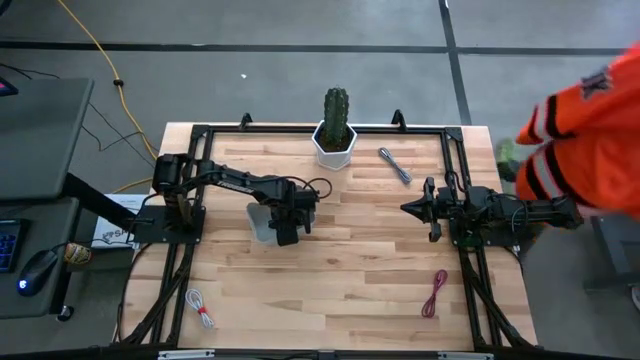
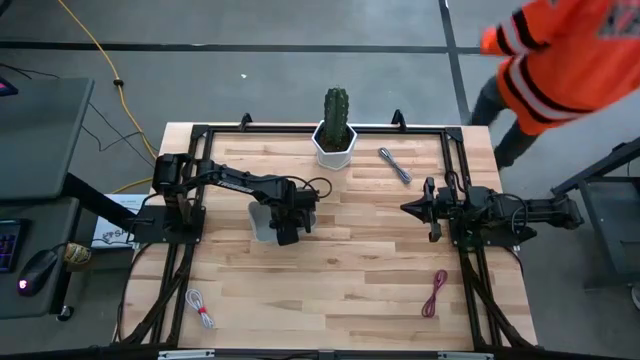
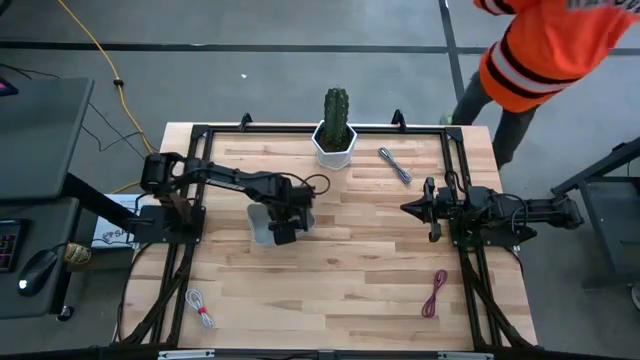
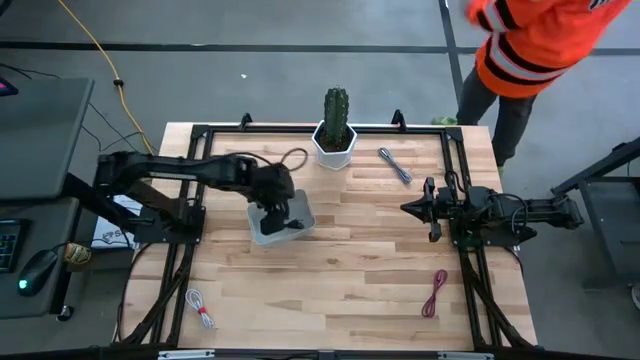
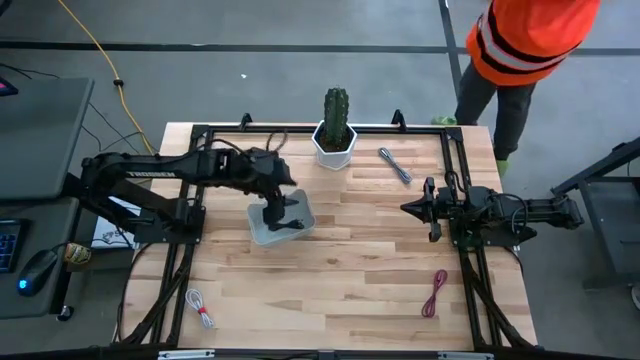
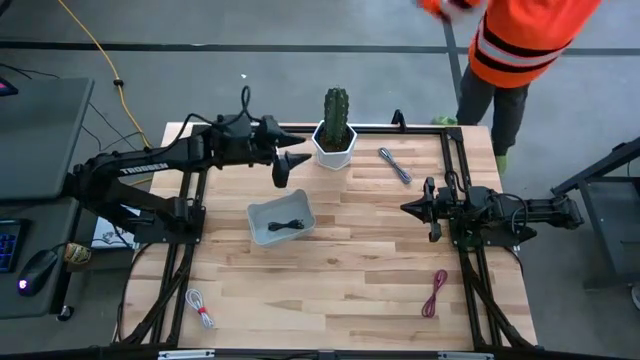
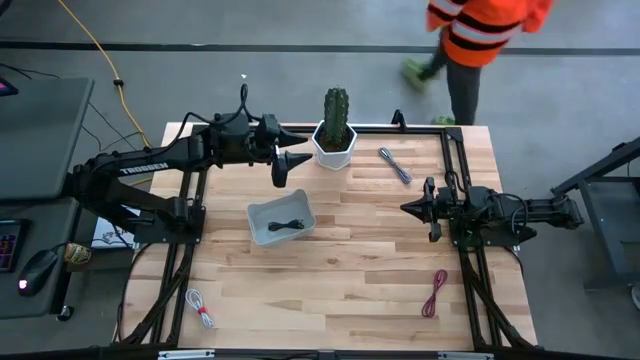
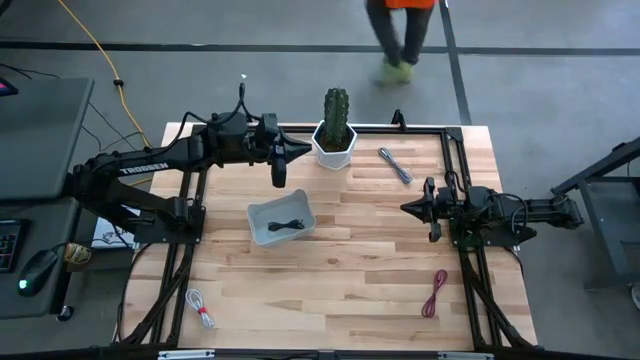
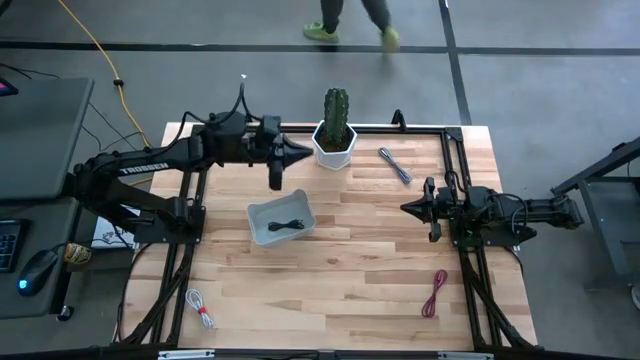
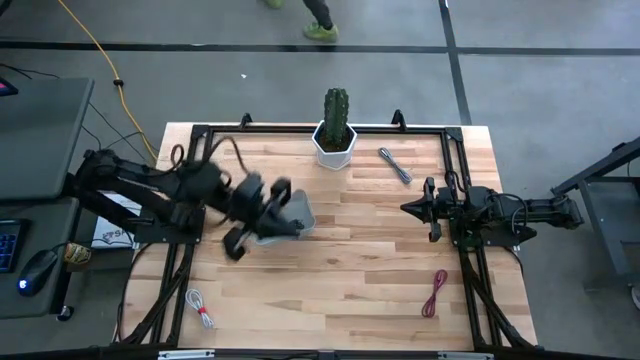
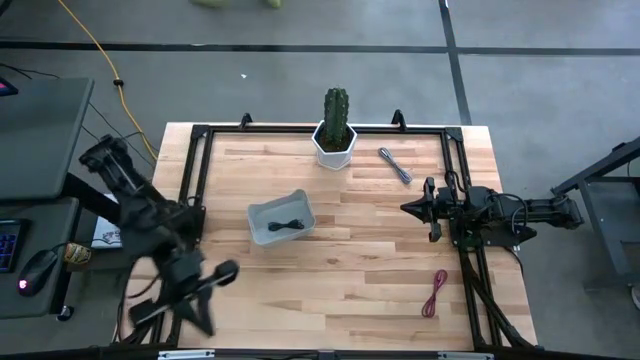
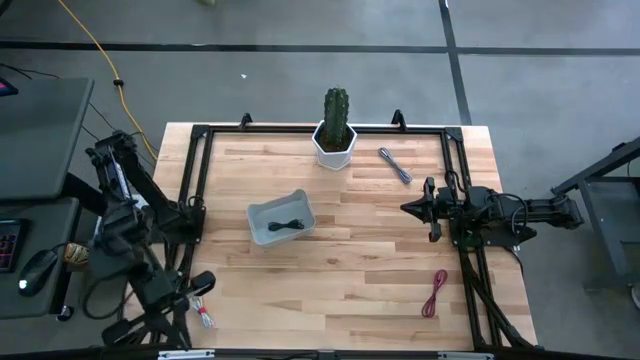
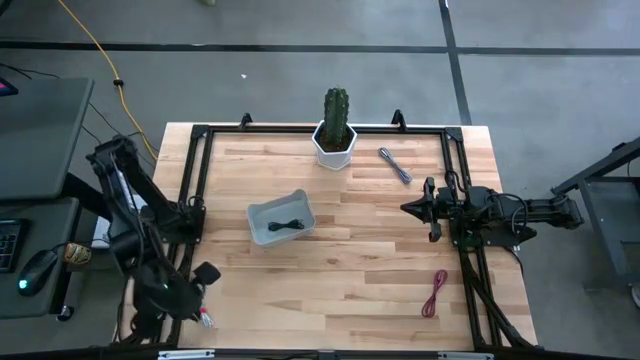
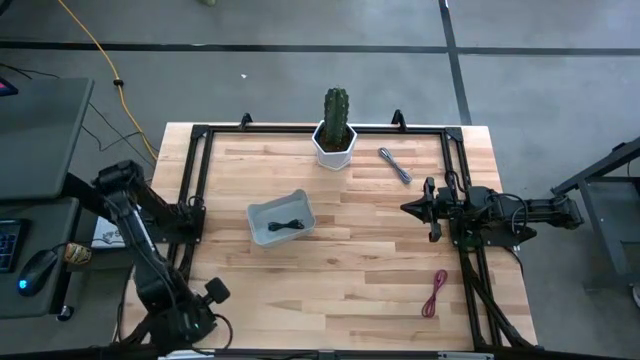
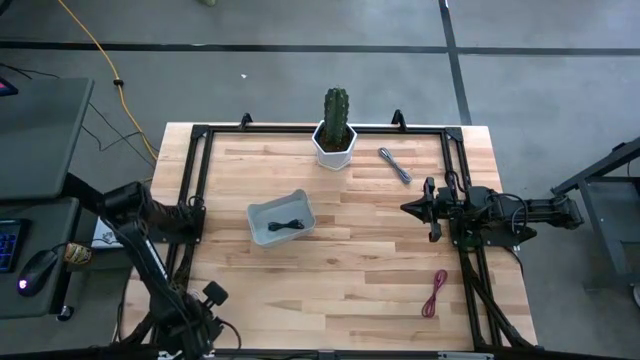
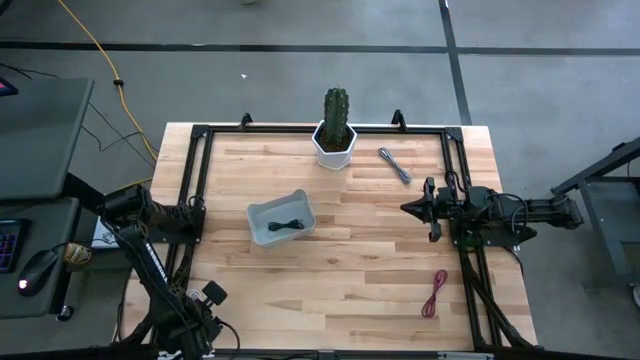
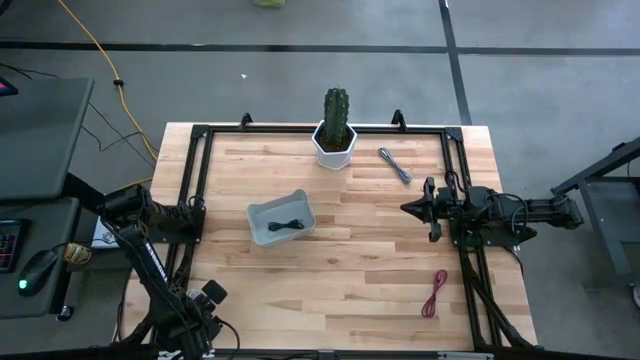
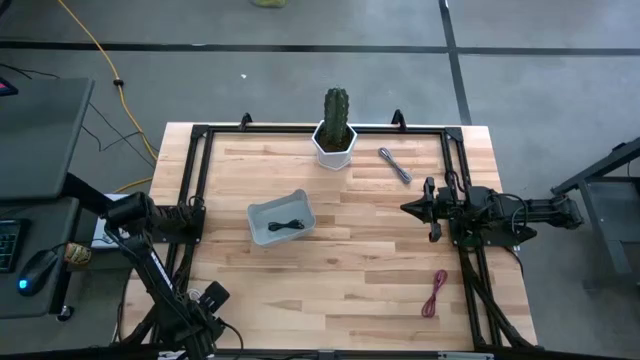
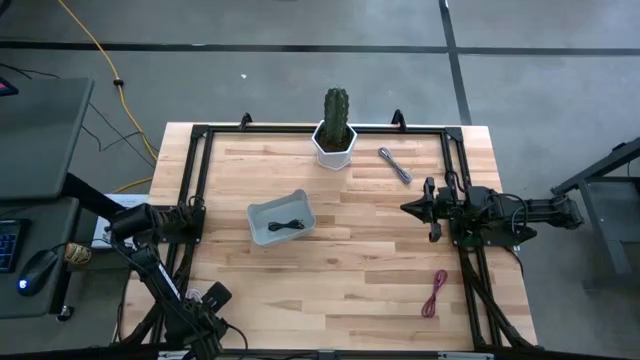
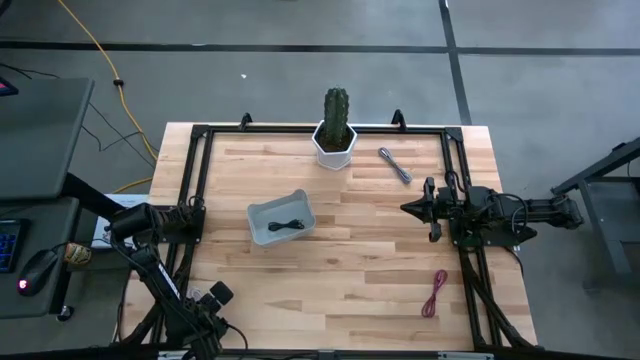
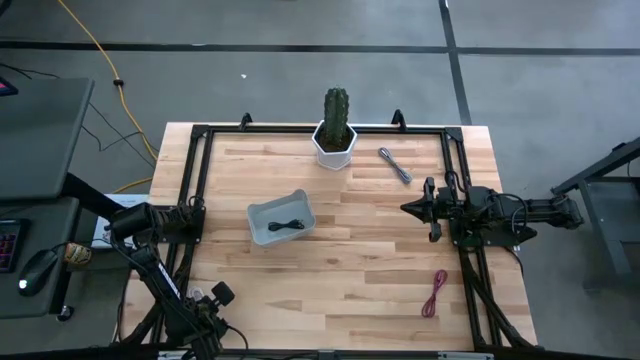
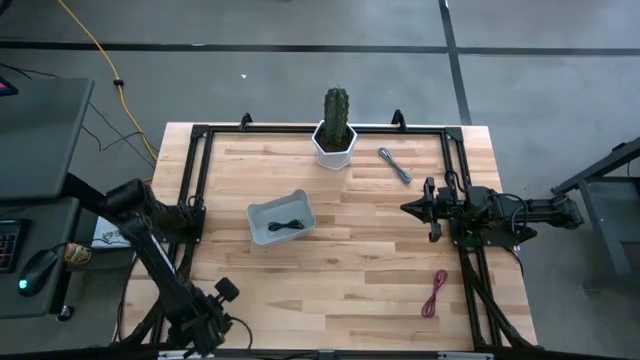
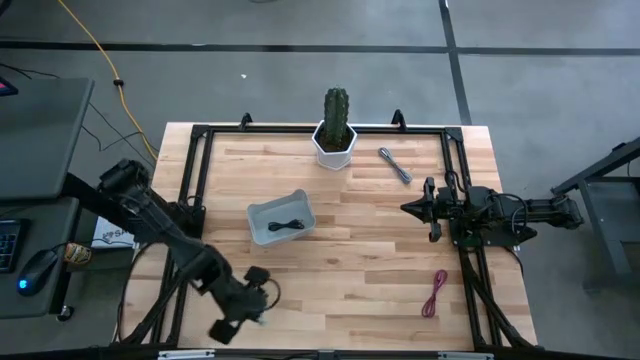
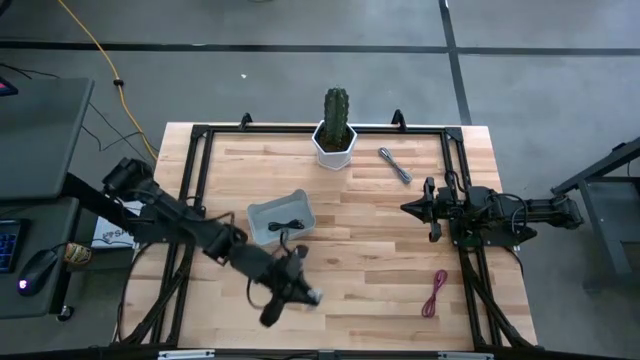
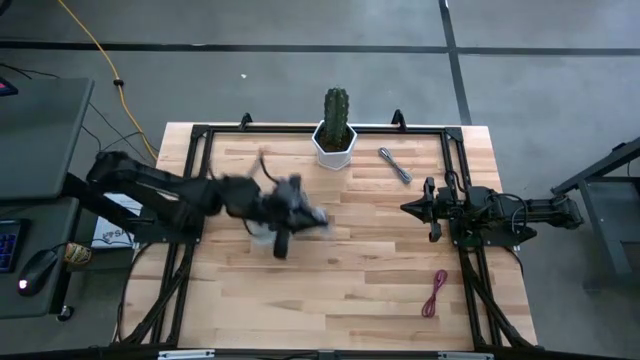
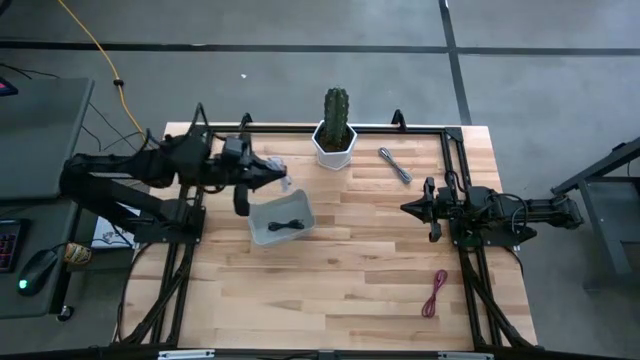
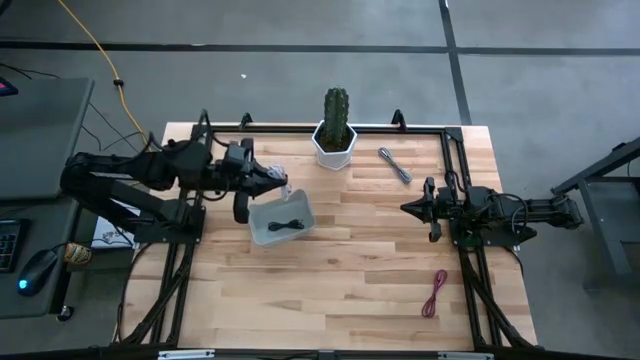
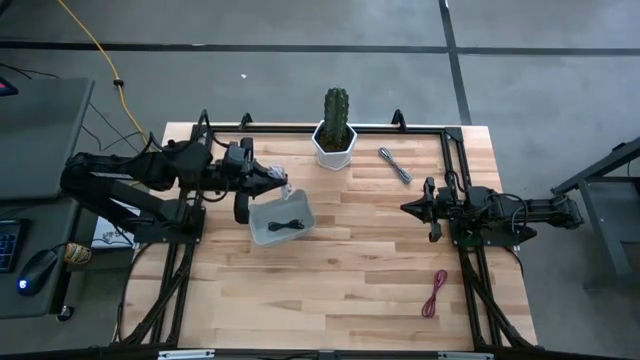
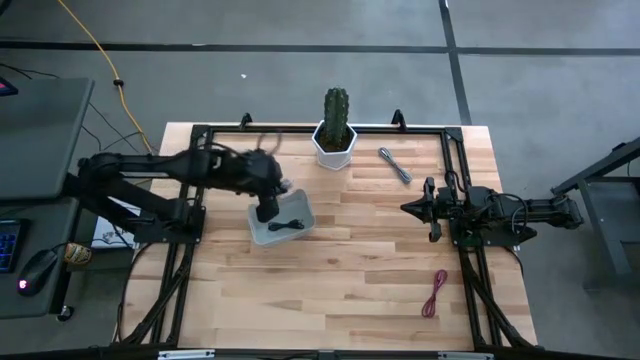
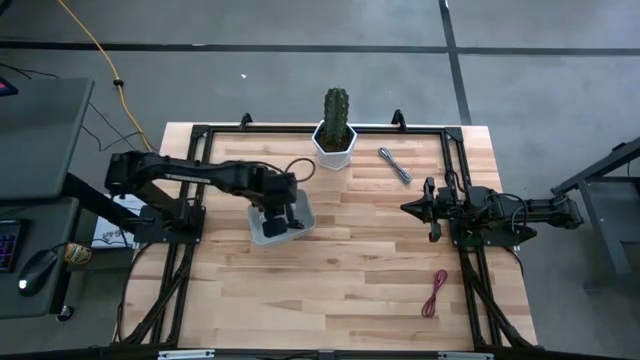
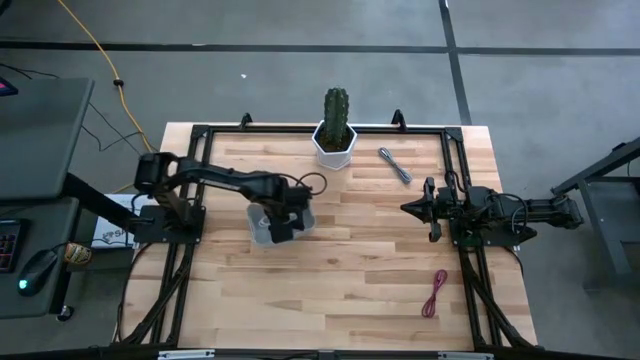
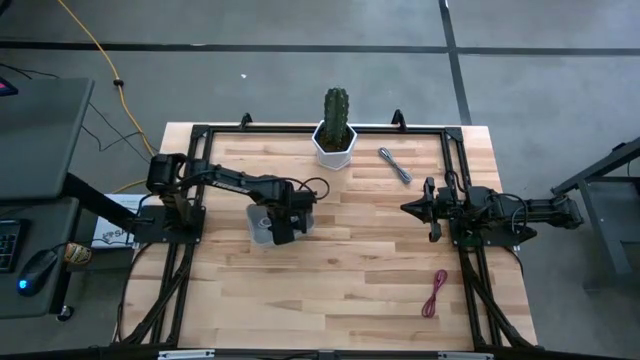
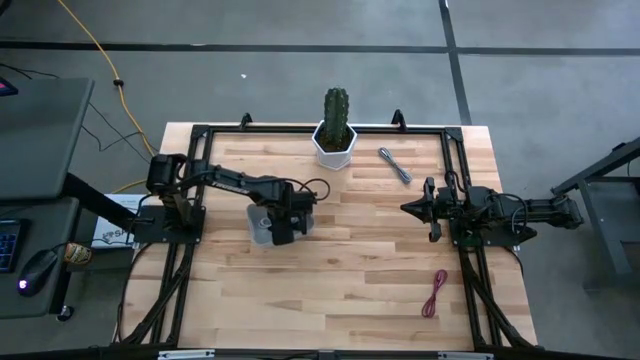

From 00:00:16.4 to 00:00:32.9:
Task: Pick and place USB-C Cables
Put the white charger cable into the gray bin

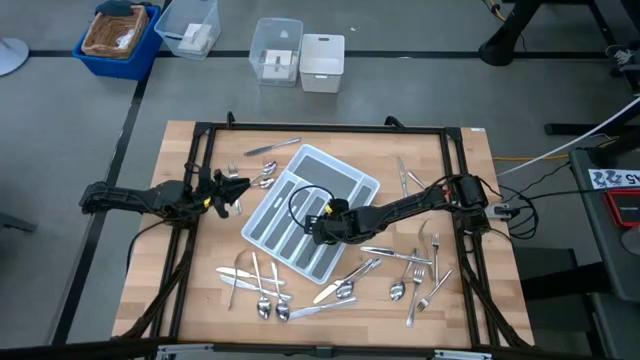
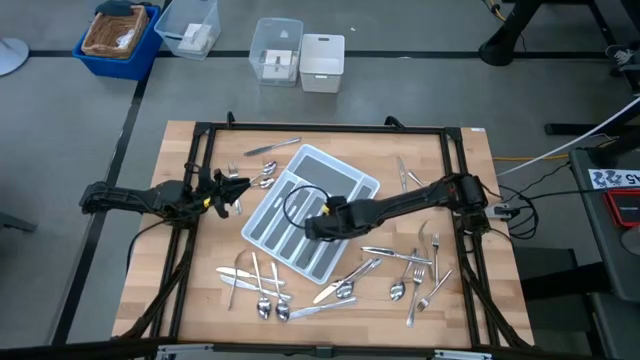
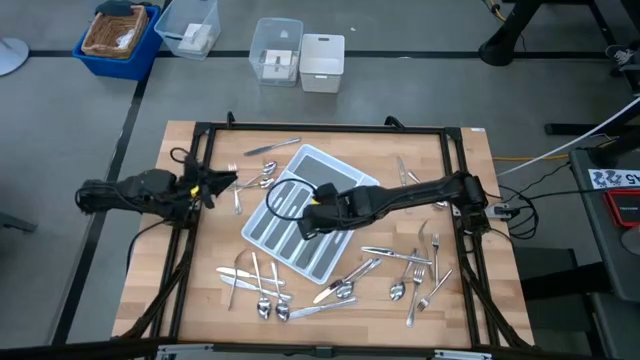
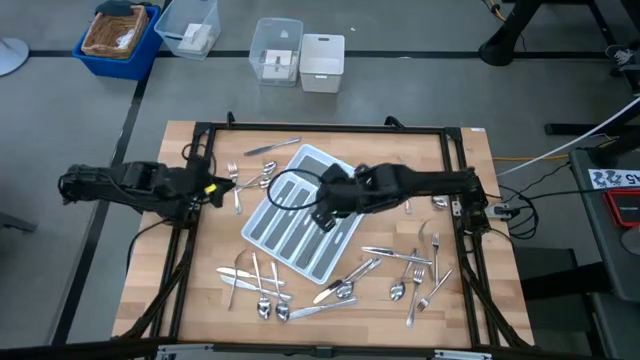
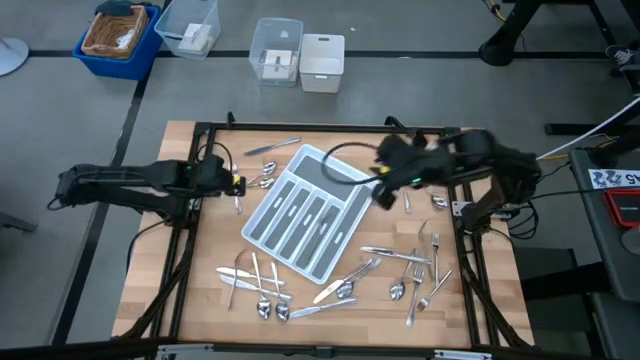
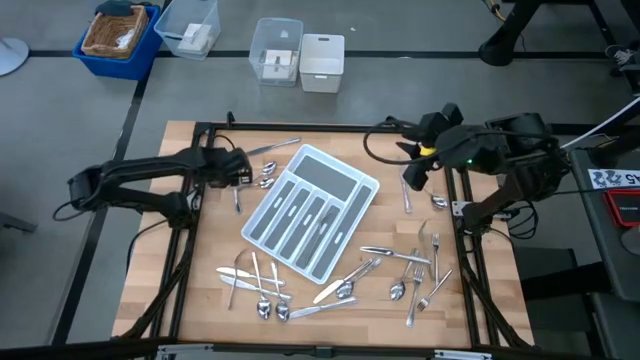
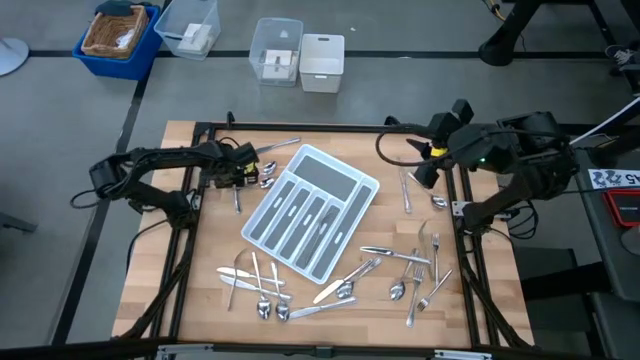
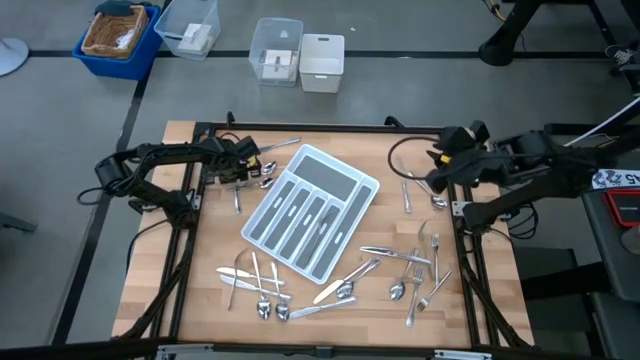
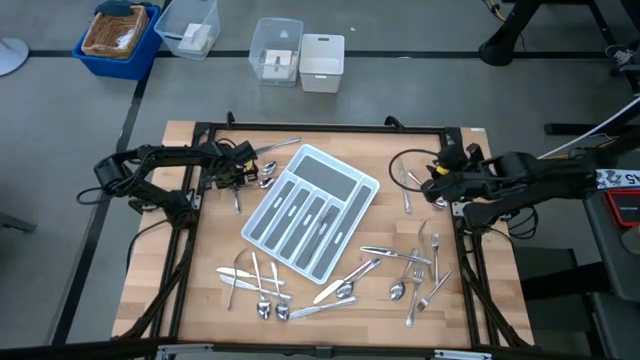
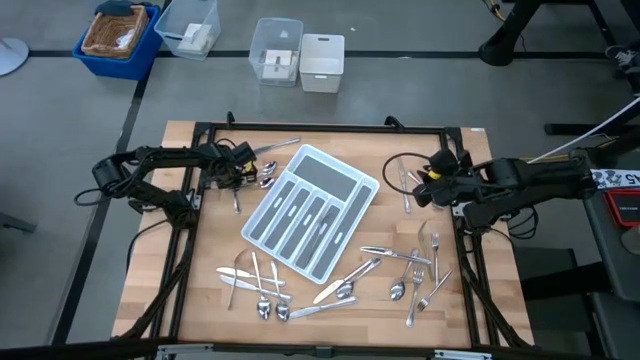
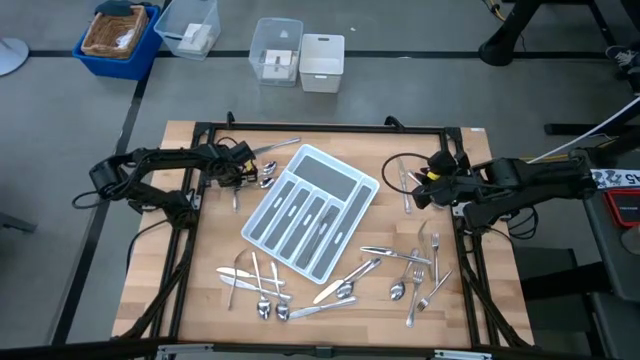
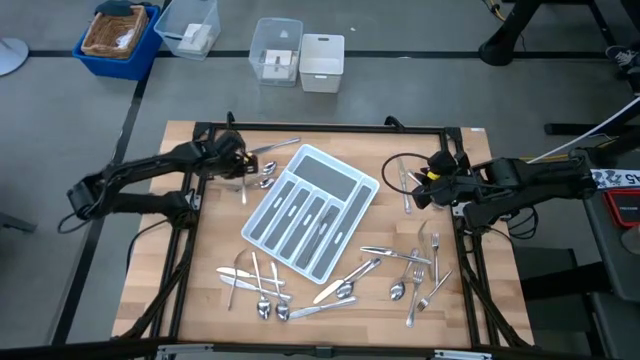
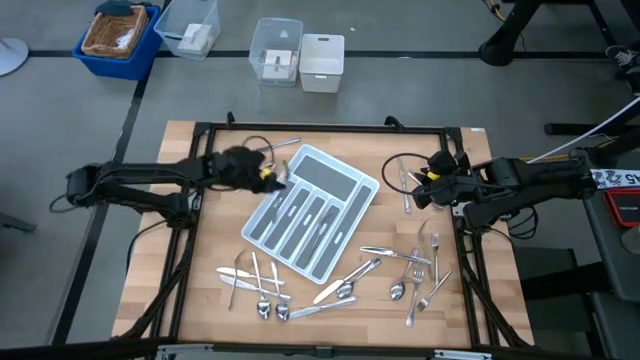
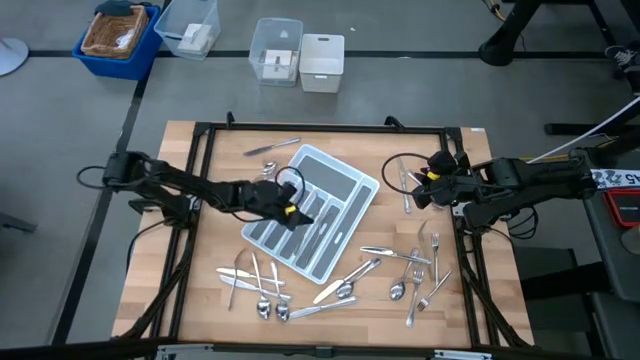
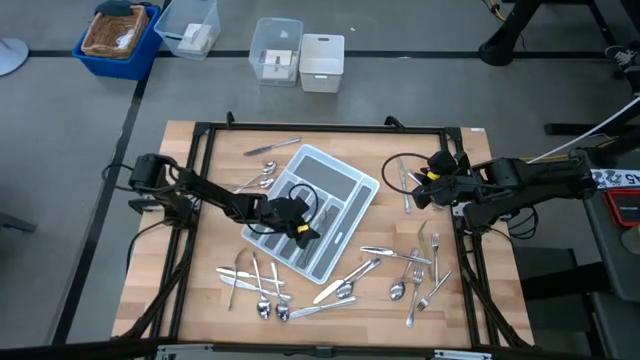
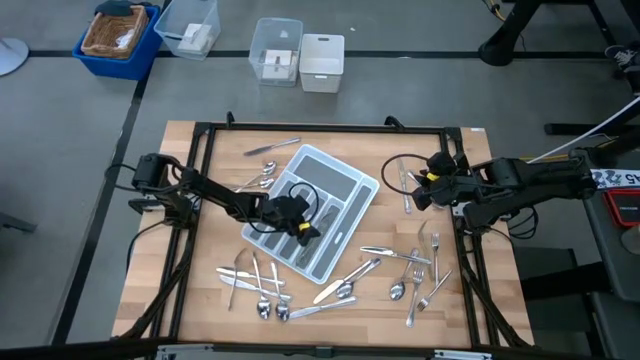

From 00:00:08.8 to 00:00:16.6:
Task: Sort silverware
Put the silver fork into the white cutlery tray
